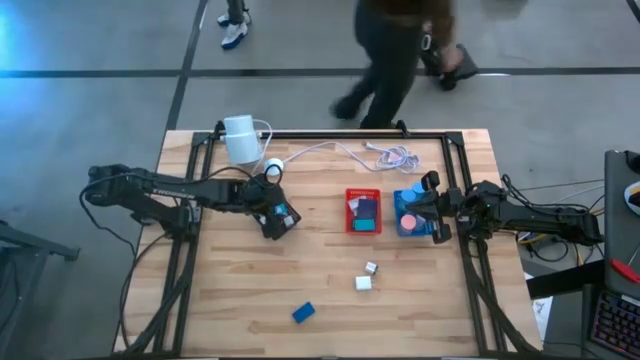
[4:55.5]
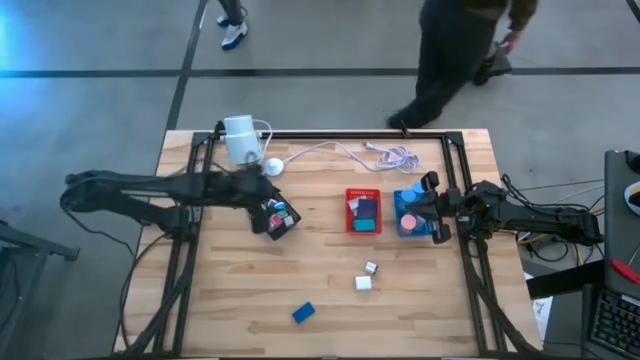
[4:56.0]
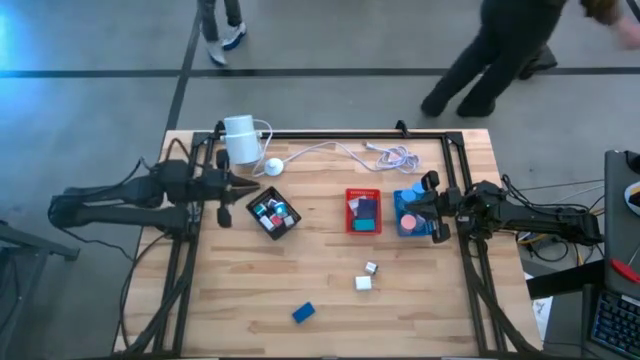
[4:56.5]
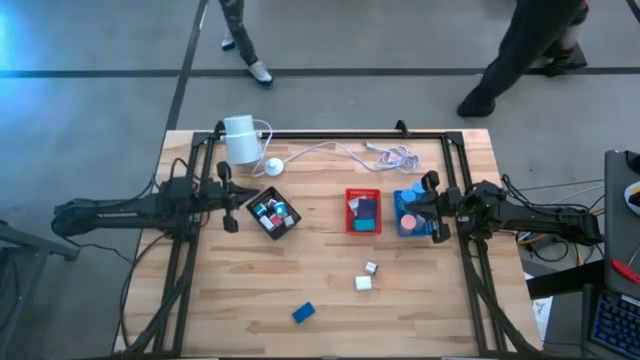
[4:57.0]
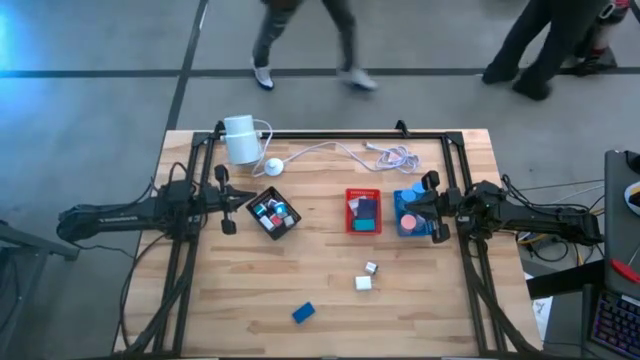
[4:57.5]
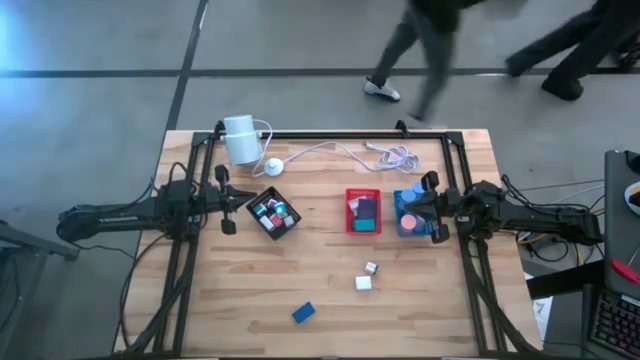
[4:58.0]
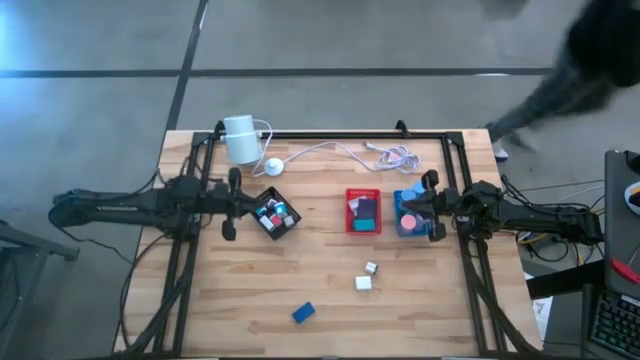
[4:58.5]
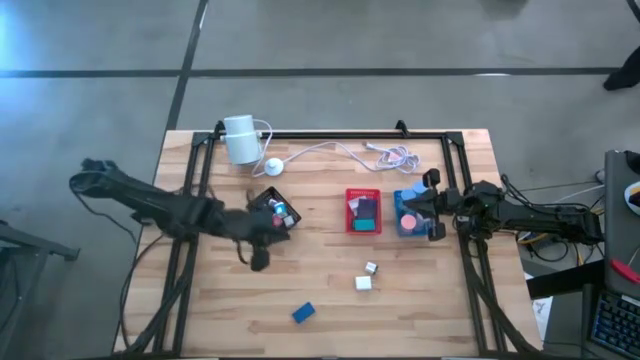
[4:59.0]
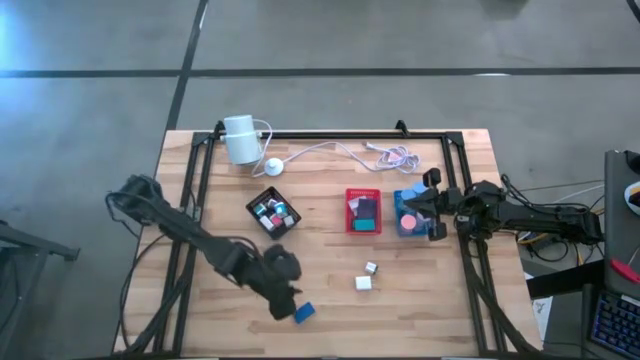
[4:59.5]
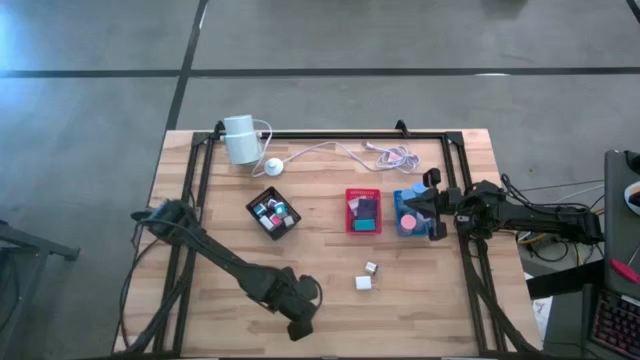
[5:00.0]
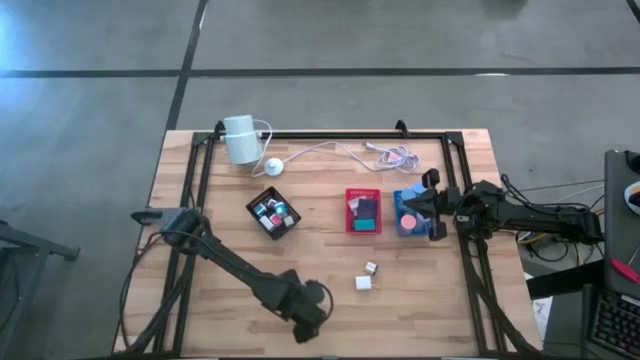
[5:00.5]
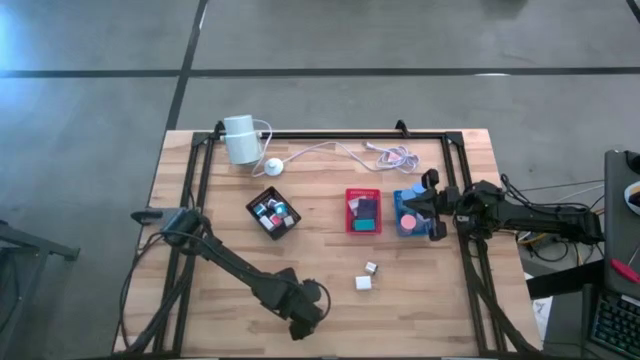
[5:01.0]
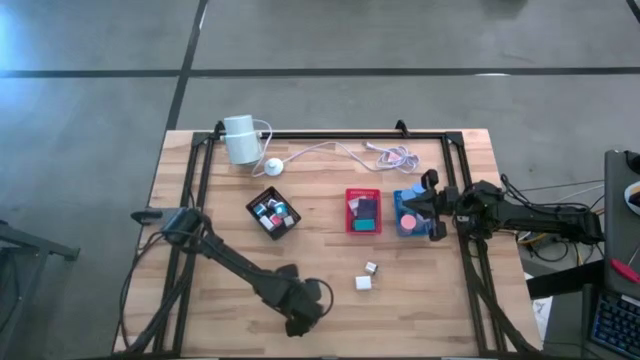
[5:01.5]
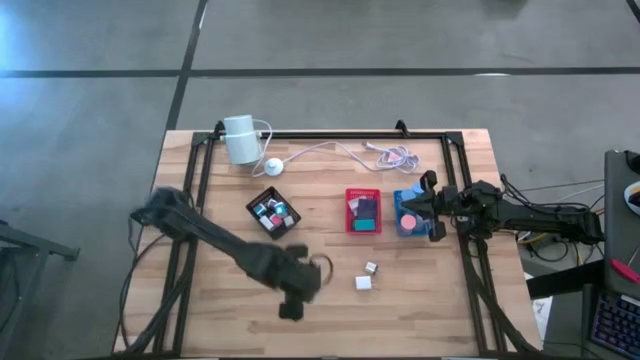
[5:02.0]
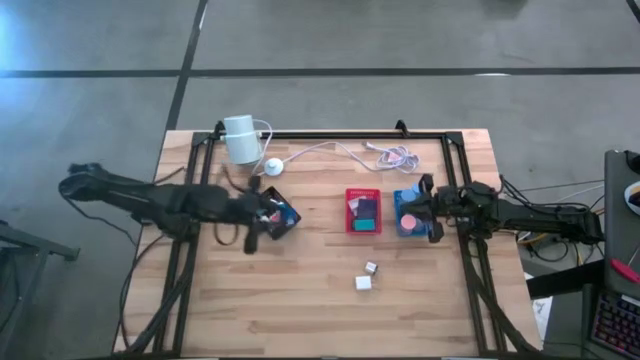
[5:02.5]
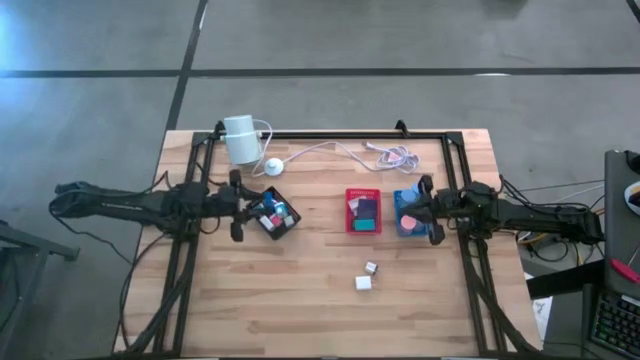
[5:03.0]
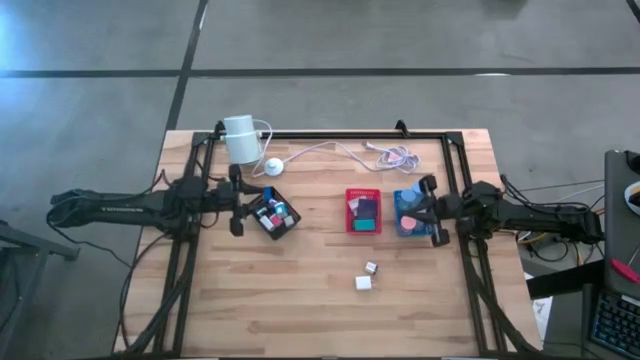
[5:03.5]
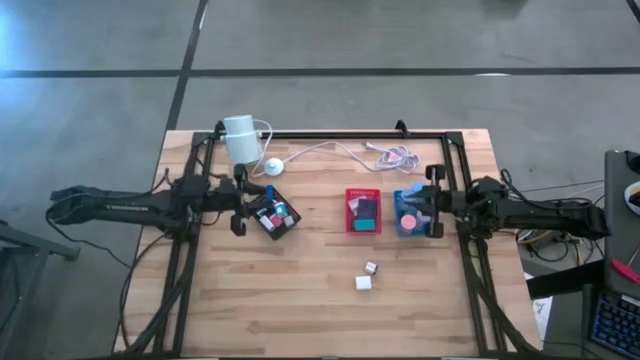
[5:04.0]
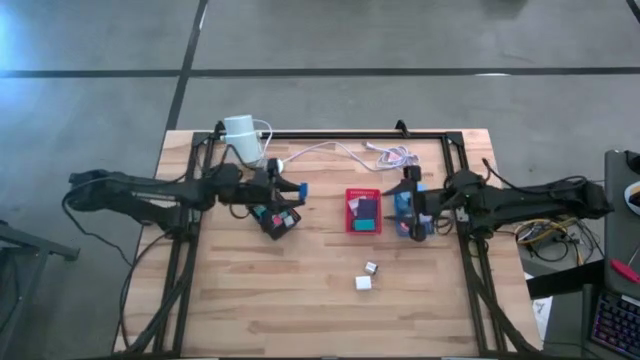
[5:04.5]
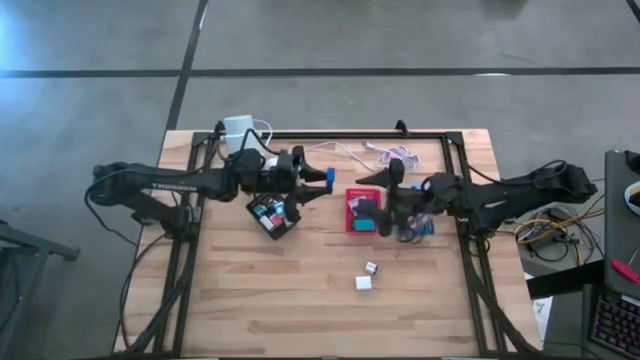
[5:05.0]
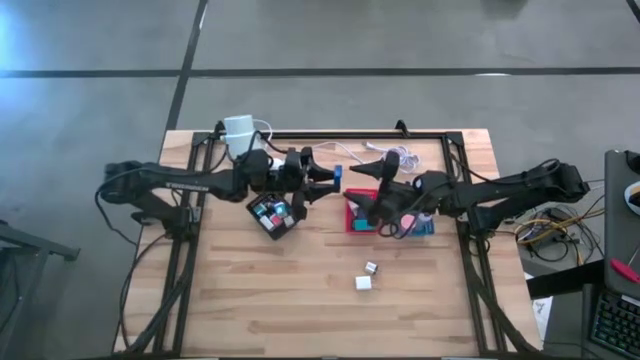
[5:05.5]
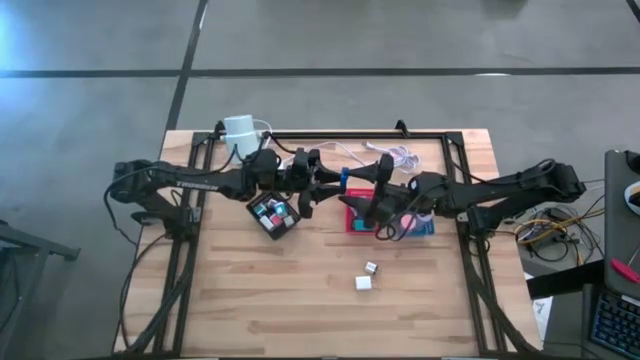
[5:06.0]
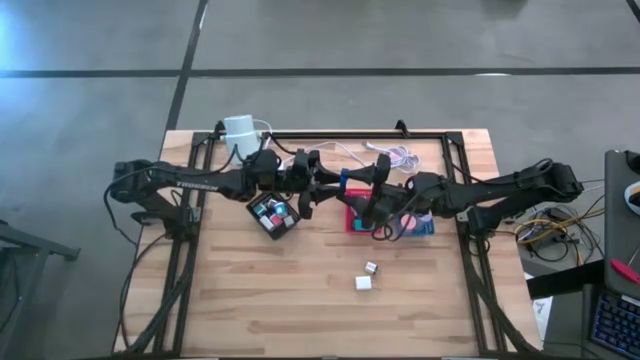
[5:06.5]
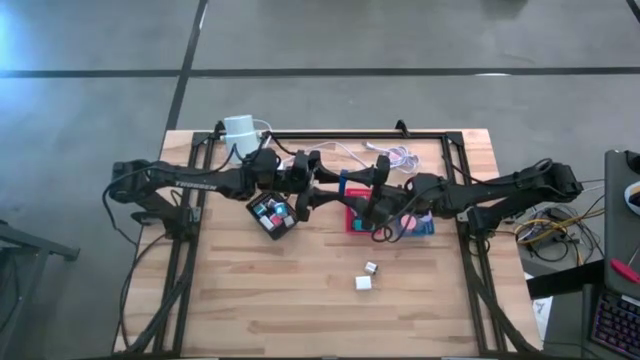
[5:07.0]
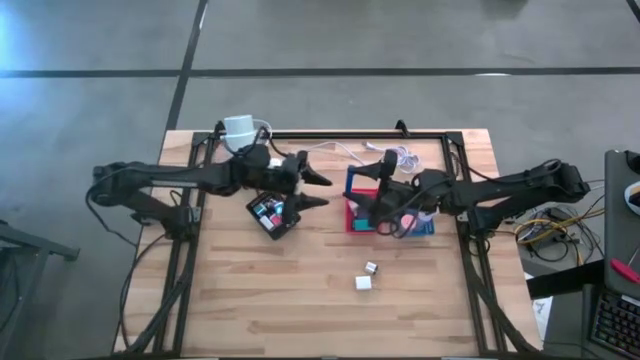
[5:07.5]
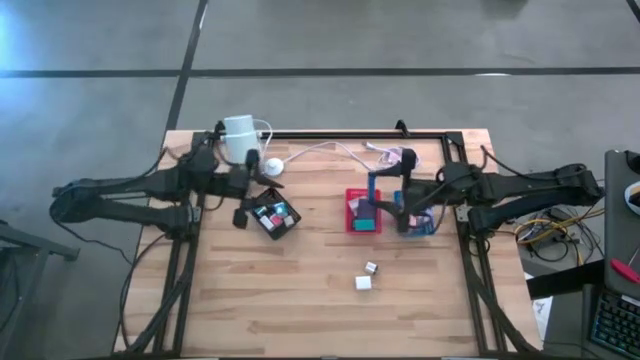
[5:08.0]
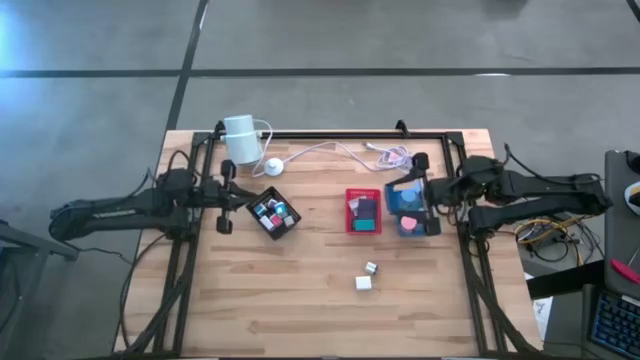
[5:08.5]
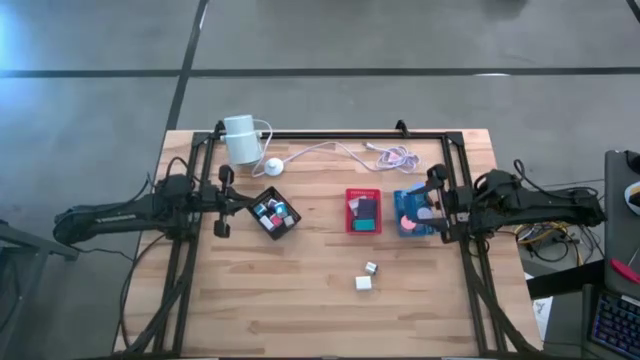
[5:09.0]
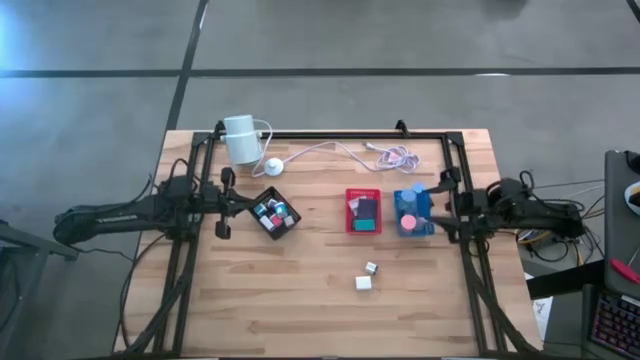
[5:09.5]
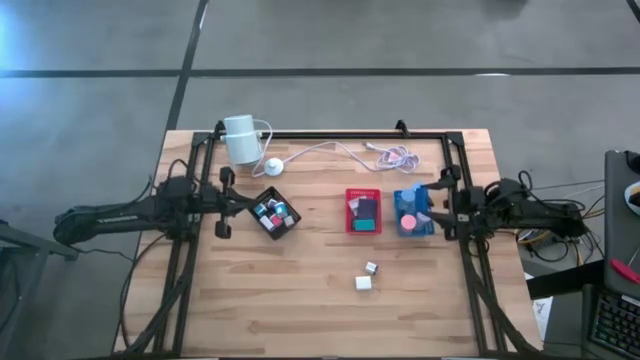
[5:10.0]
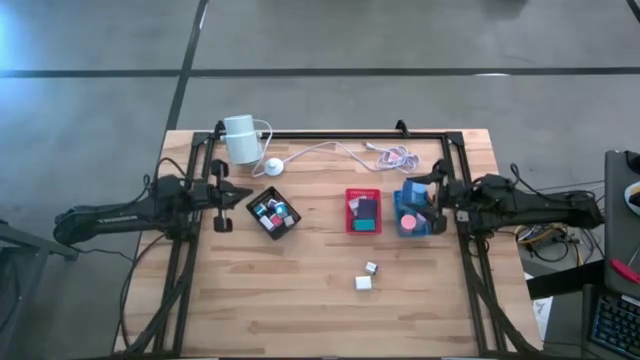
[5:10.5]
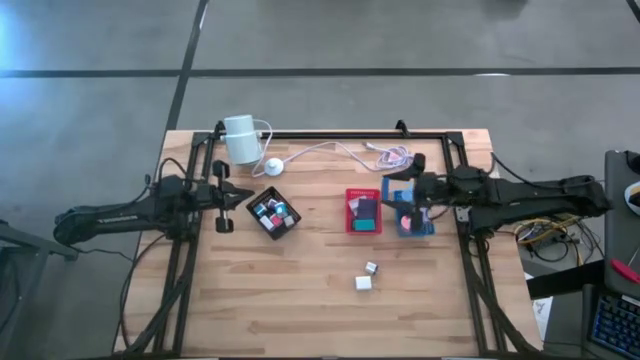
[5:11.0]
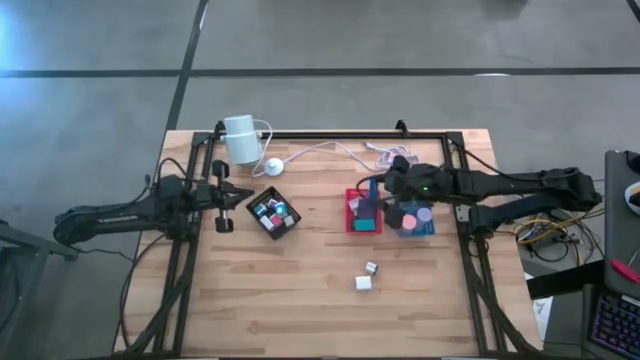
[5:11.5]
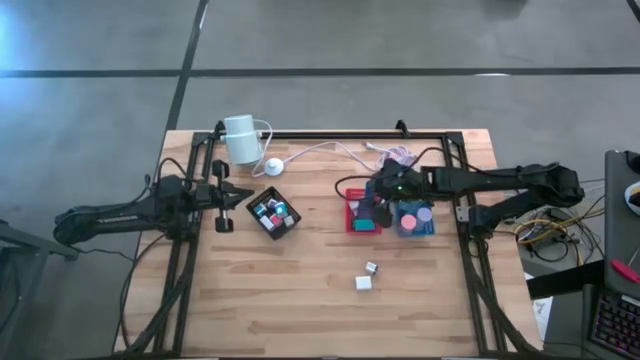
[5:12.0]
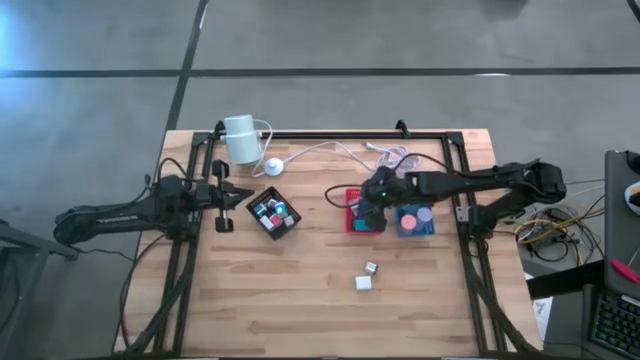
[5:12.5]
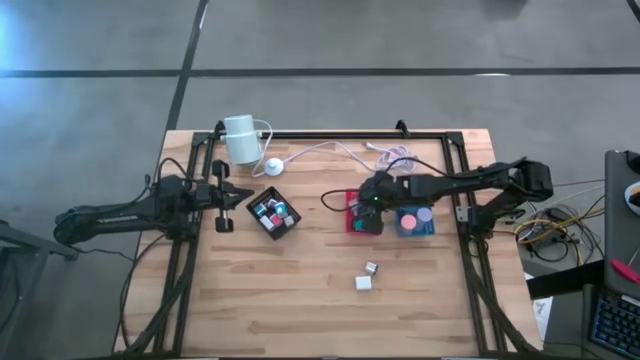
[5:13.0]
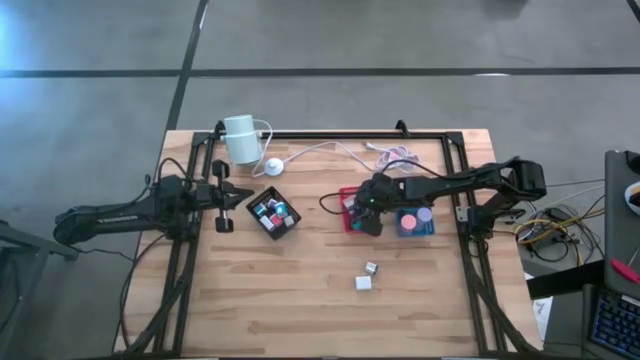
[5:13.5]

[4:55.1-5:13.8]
Task: Pick & Place Office items
Put the dark blue digital clock into the red bin

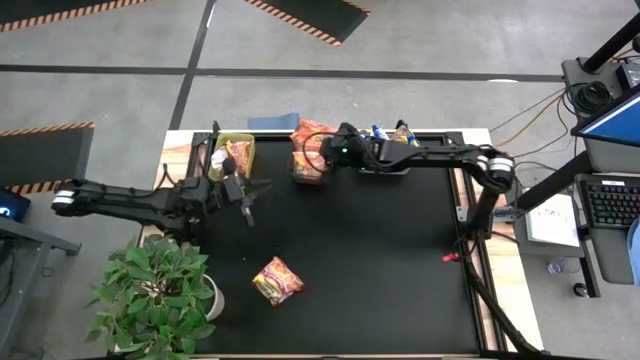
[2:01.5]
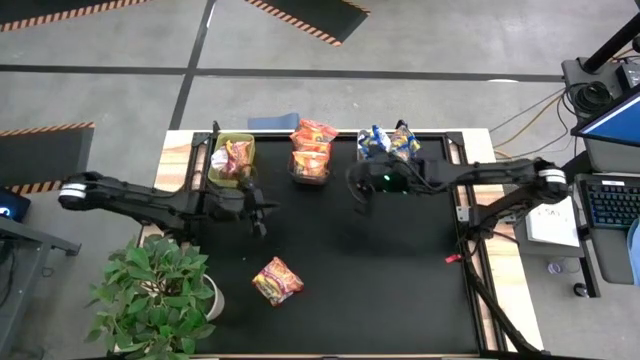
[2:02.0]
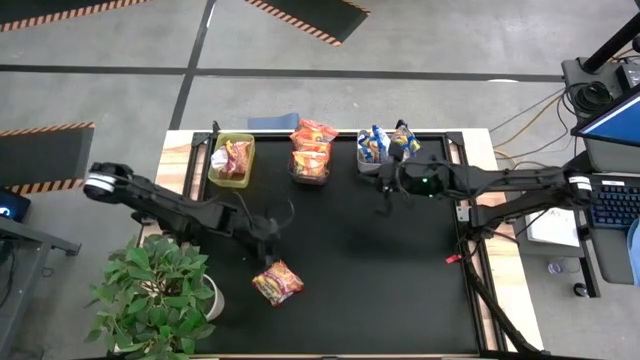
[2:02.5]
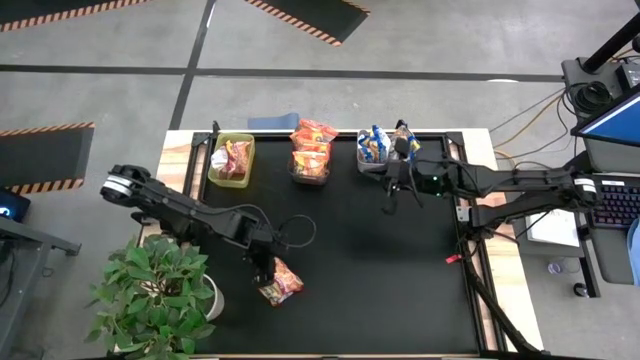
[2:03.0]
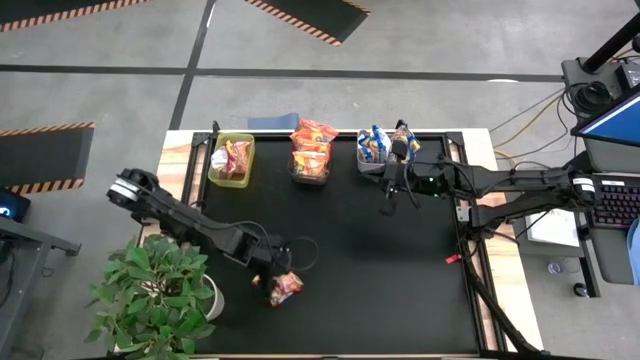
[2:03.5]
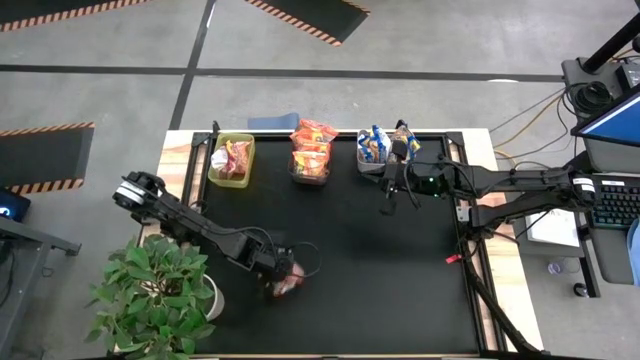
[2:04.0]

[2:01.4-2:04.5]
Task: Sort Maruchan noodles
Put the red noodle pack into the yellow bin
